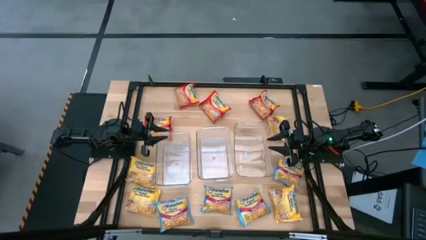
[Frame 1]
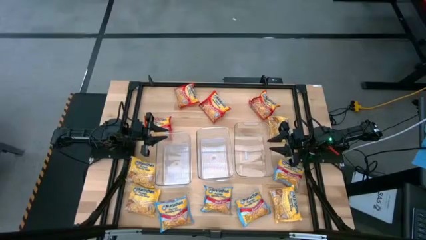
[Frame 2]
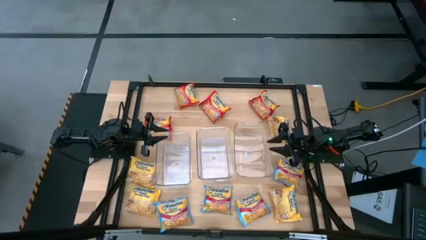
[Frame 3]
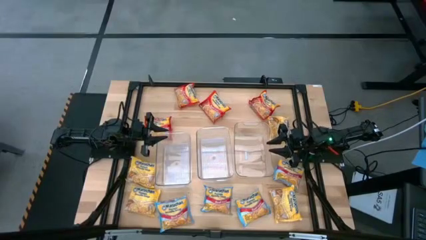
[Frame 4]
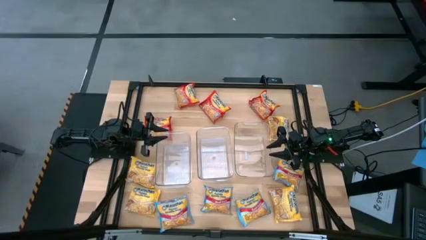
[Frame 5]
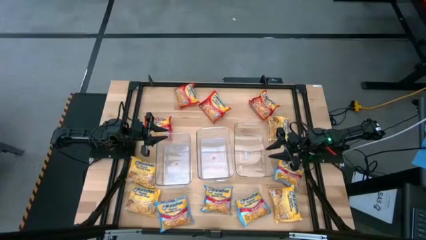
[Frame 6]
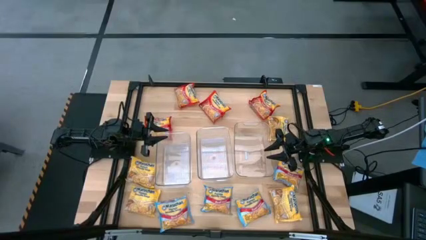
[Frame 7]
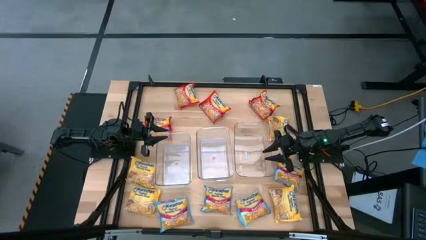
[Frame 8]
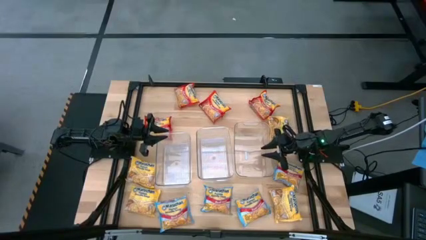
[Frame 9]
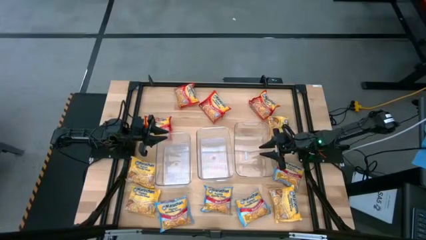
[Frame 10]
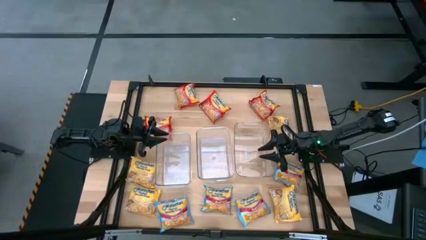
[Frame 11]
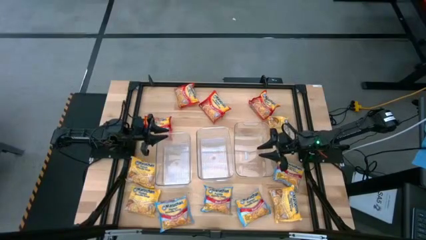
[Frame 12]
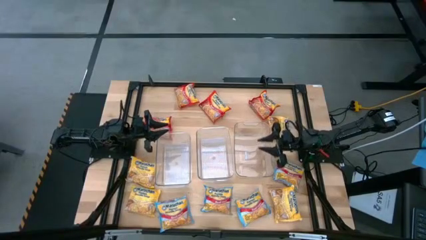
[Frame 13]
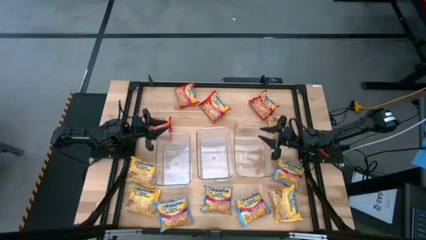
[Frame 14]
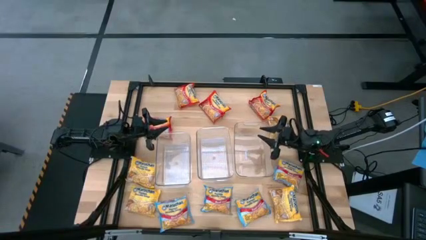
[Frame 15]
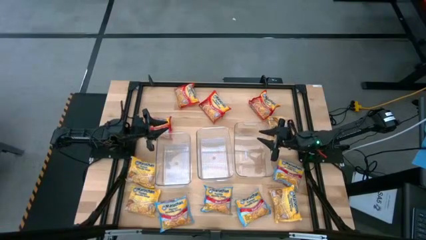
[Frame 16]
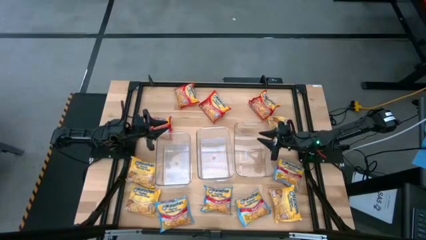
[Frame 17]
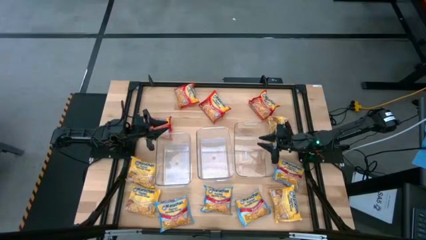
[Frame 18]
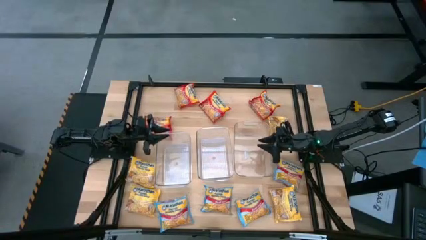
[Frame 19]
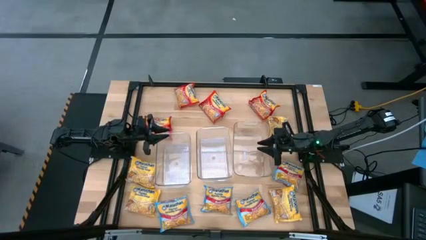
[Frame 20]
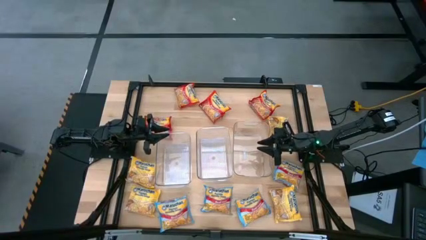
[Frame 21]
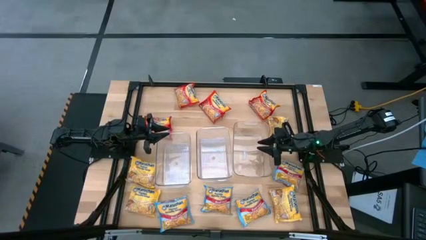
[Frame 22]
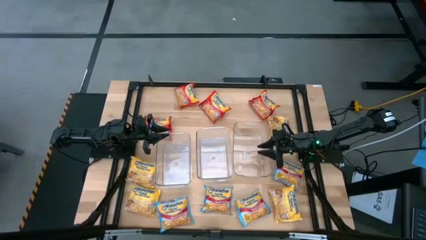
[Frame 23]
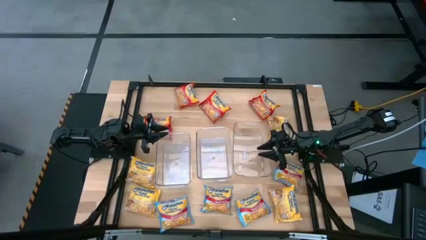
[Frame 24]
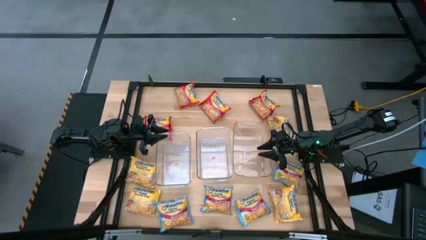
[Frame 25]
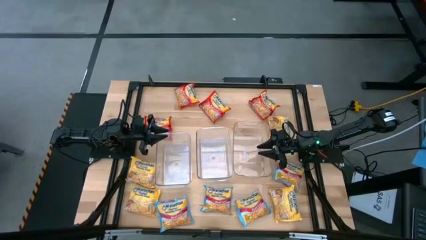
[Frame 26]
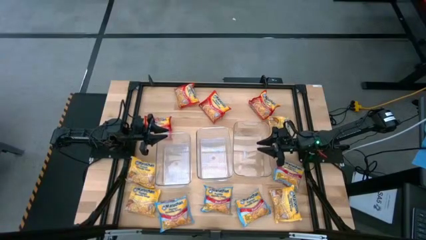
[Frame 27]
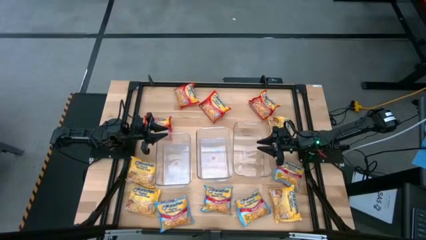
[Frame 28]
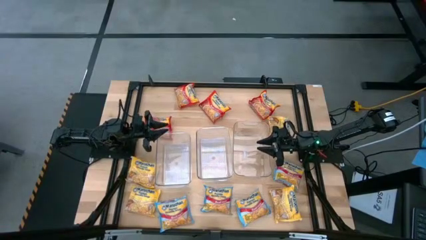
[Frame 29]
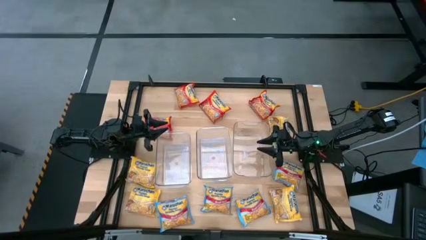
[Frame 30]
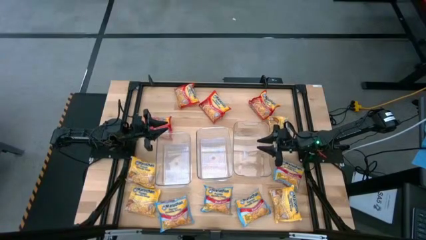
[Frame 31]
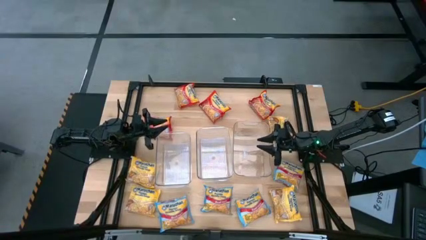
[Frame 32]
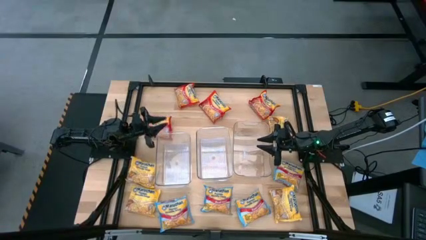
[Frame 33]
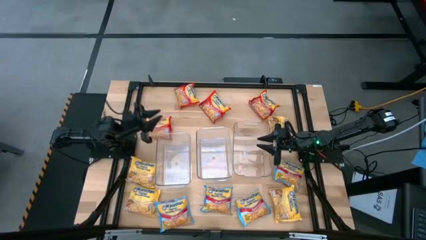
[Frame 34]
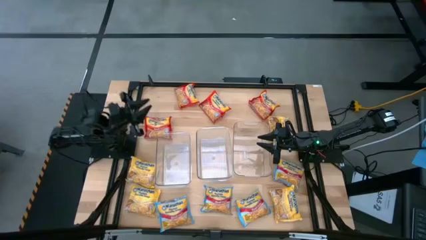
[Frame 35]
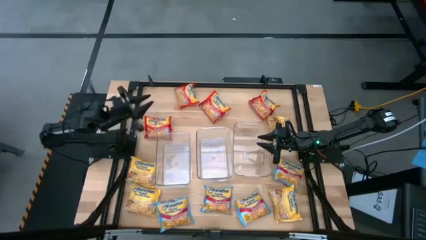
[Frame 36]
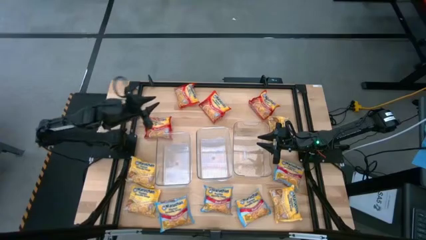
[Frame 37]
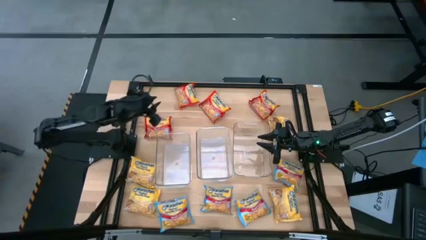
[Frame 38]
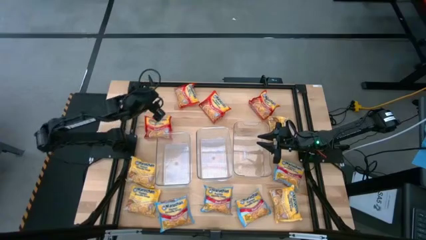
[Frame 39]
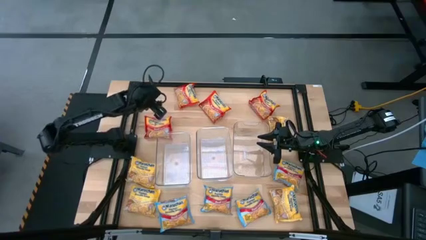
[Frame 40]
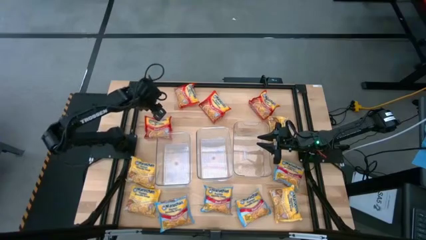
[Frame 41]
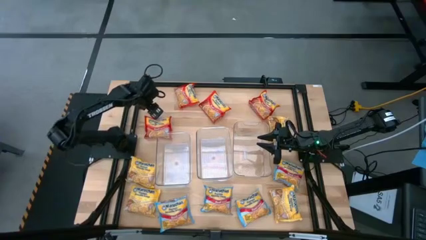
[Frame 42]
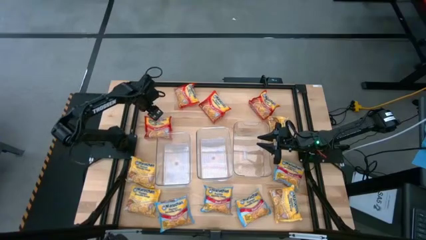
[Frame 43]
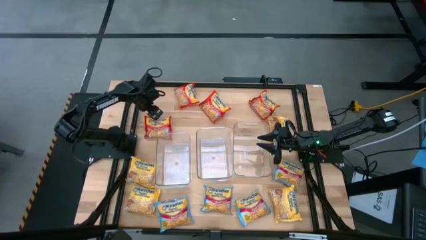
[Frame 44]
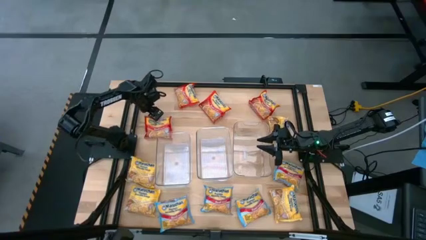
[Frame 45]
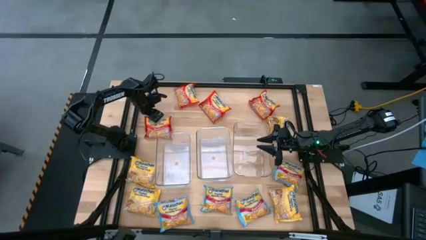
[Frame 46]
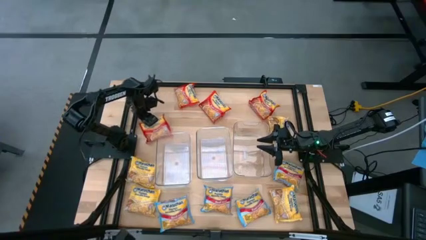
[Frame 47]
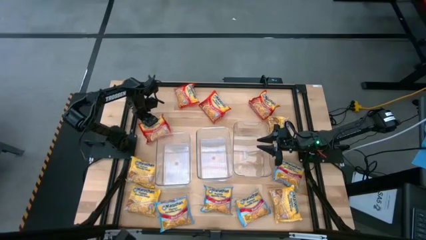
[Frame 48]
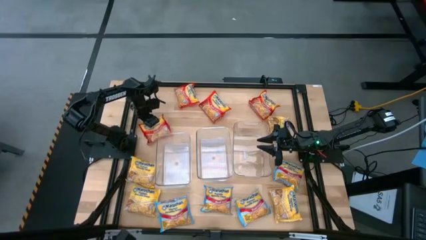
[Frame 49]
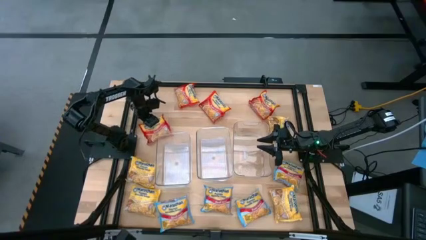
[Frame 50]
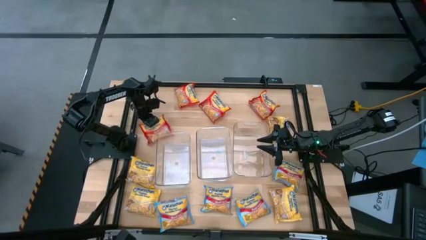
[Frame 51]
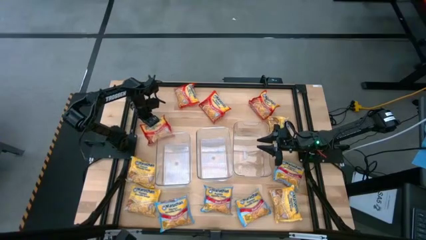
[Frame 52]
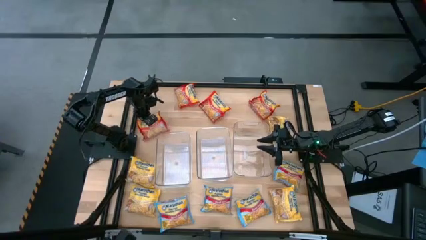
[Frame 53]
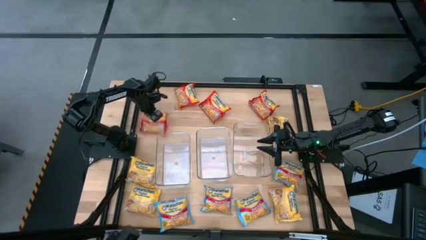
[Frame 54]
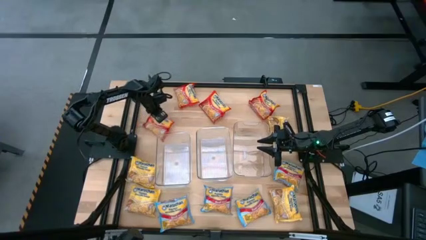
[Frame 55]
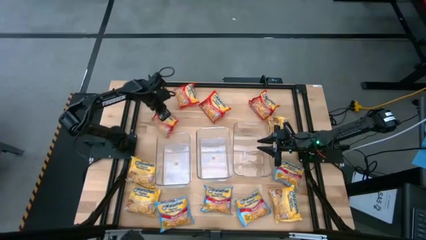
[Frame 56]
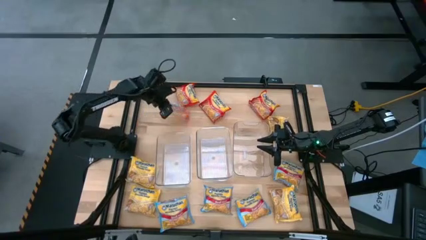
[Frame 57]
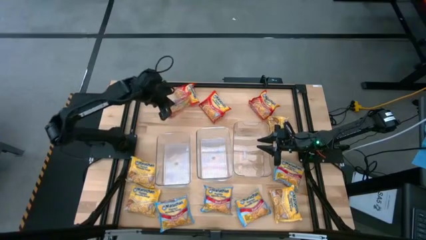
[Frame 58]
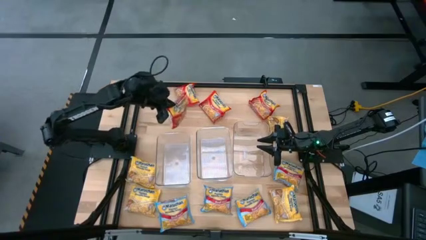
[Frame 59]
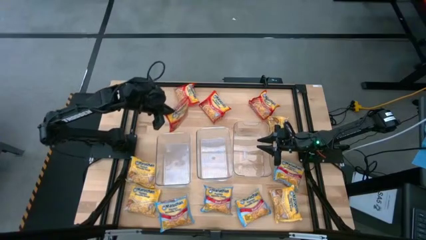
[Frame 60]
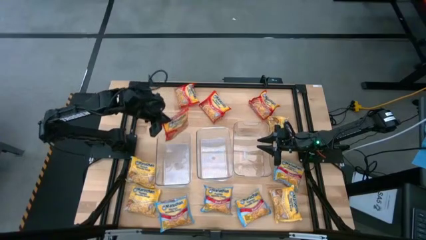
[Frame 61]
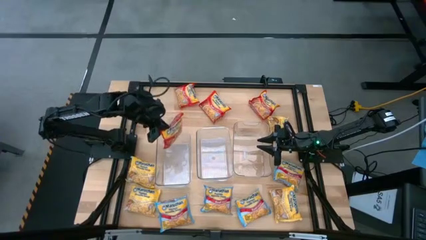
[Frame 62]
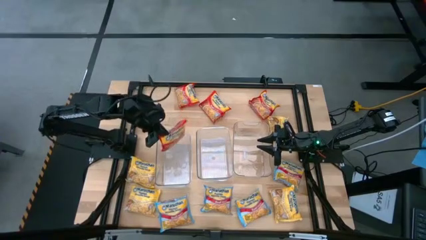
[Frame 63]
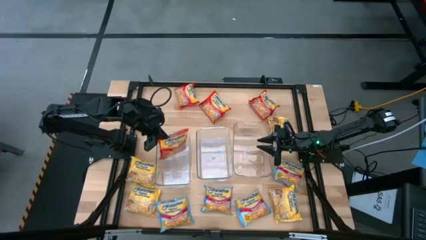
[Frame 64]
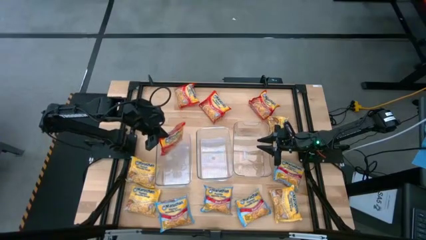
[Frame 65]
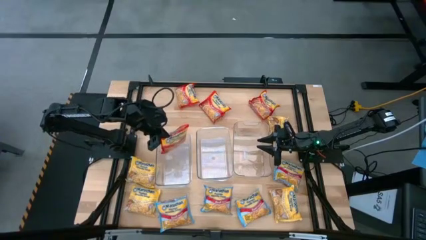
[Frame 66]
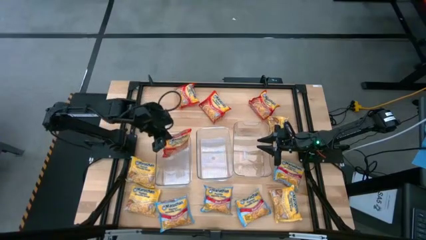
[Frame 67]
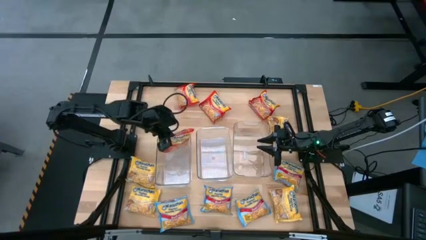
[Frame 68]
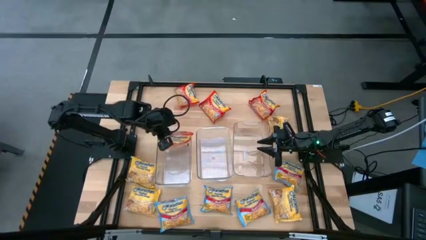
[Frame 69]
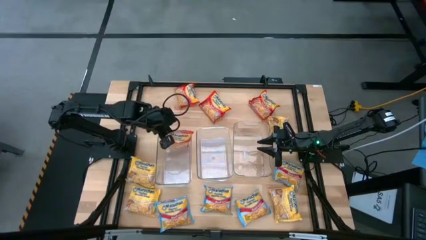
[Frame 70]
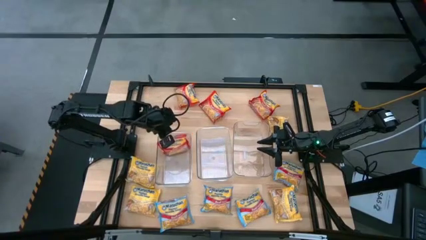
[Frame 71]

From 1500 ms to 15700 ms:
Task: Sort Maruchan noodles
Put the red noodle pack into the left transparent bin
